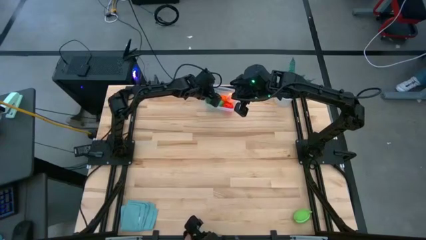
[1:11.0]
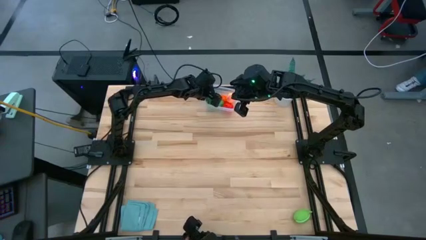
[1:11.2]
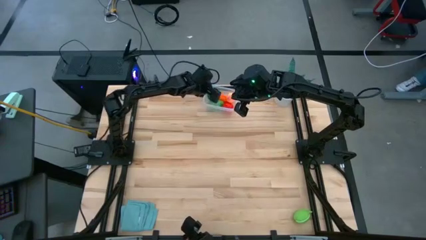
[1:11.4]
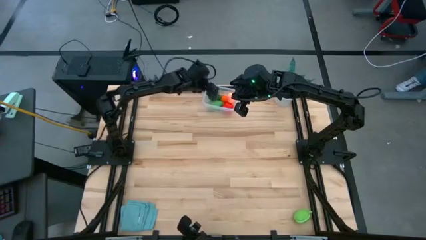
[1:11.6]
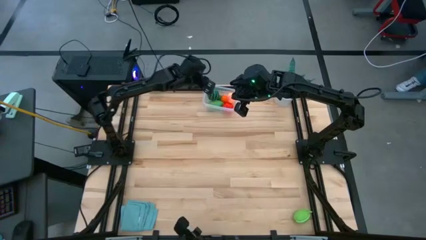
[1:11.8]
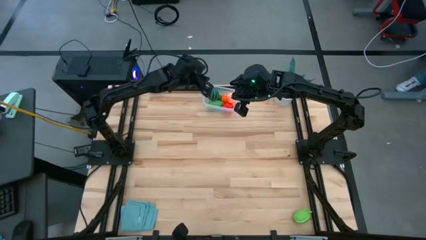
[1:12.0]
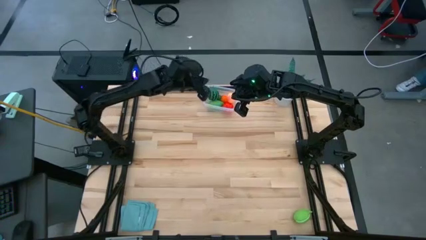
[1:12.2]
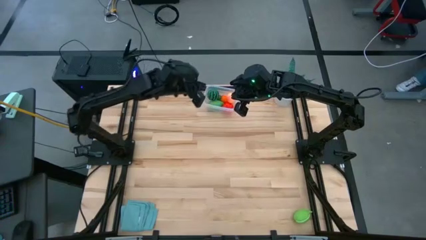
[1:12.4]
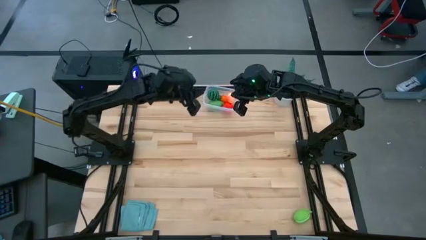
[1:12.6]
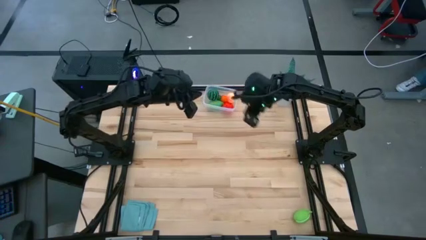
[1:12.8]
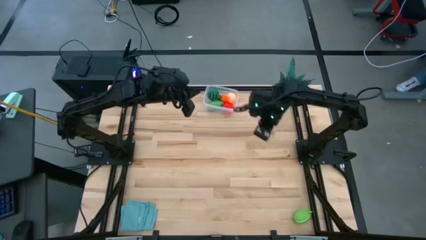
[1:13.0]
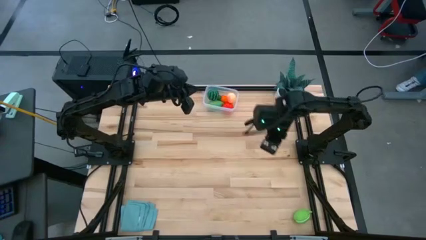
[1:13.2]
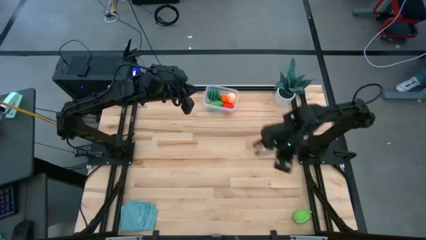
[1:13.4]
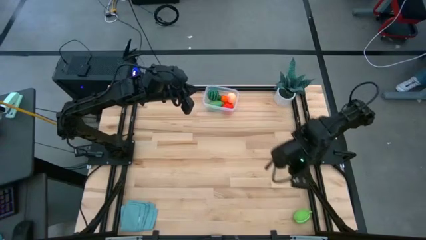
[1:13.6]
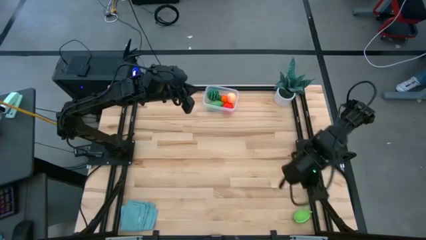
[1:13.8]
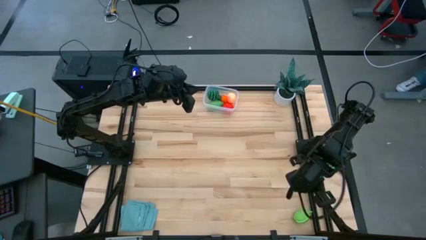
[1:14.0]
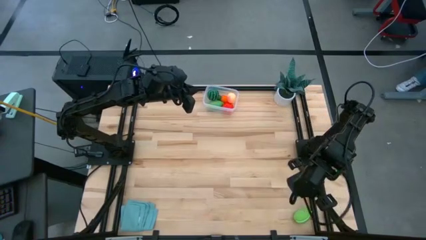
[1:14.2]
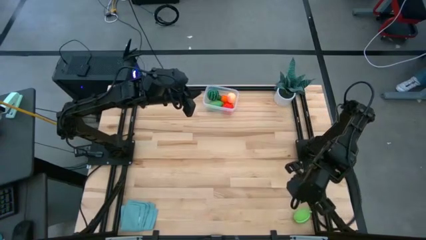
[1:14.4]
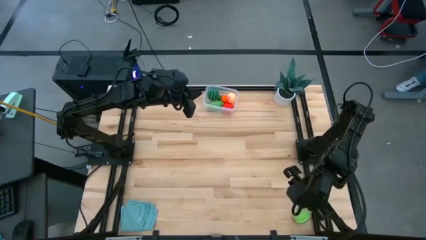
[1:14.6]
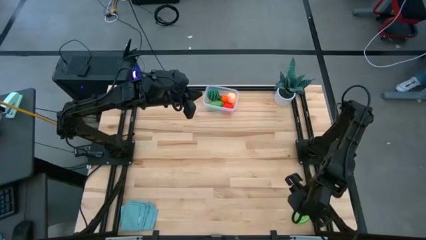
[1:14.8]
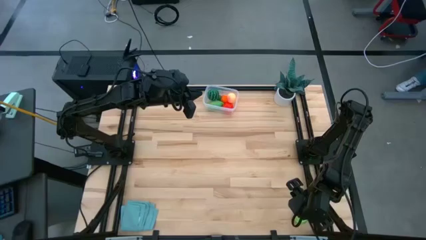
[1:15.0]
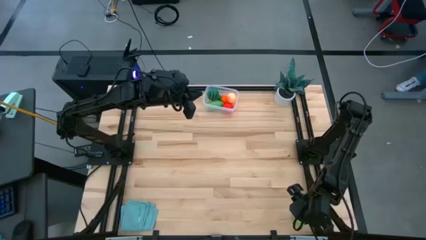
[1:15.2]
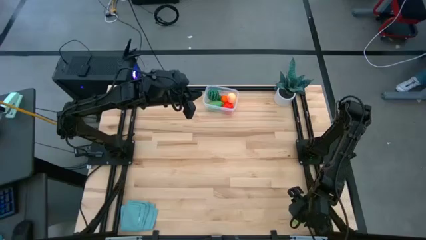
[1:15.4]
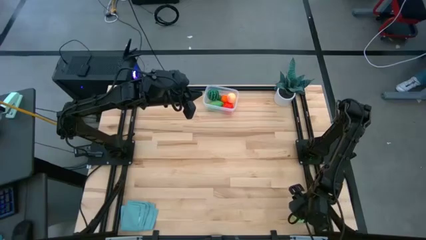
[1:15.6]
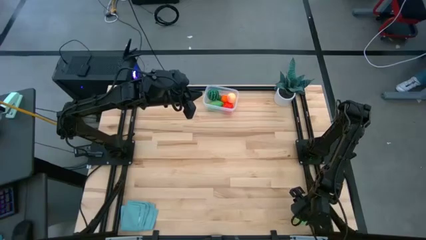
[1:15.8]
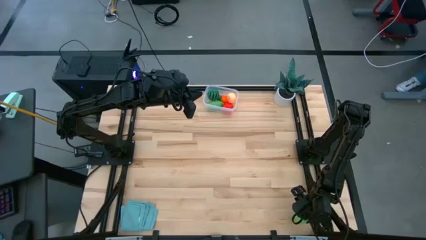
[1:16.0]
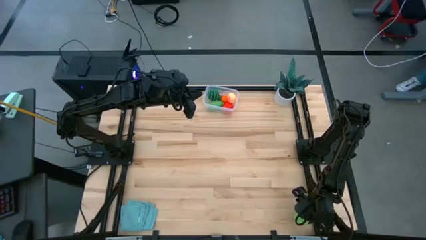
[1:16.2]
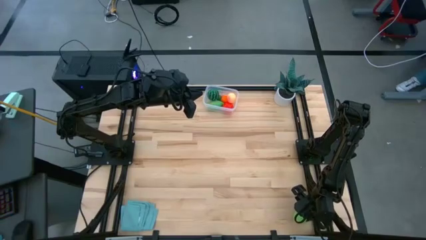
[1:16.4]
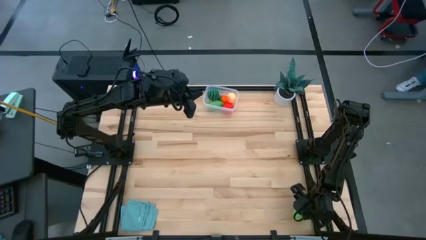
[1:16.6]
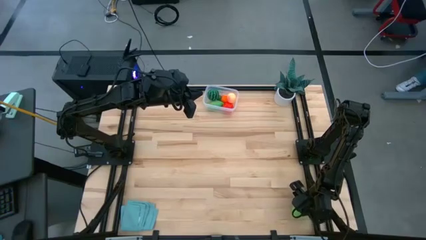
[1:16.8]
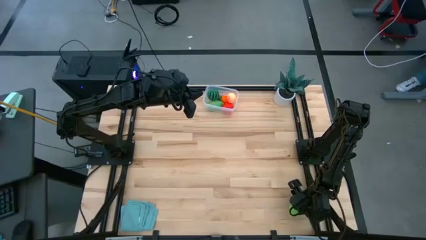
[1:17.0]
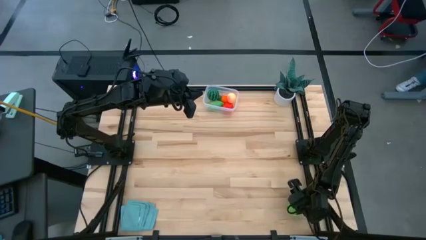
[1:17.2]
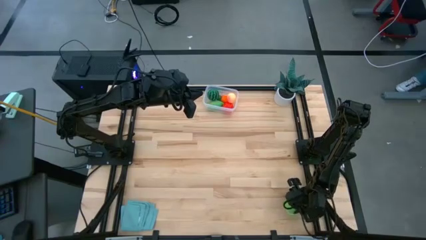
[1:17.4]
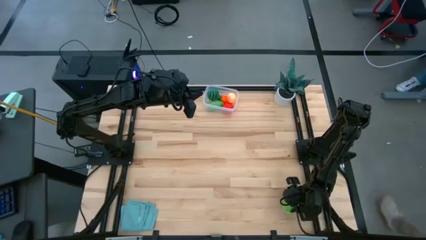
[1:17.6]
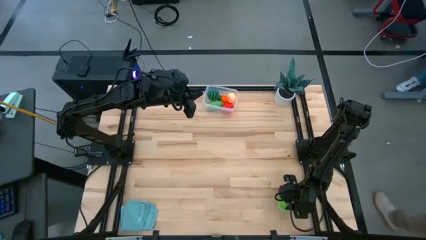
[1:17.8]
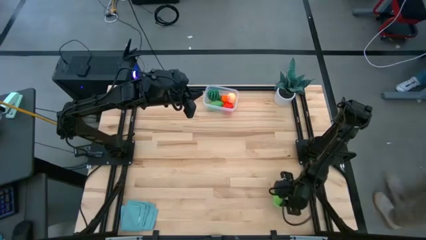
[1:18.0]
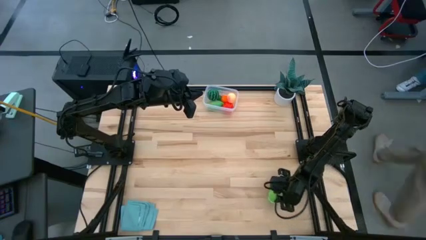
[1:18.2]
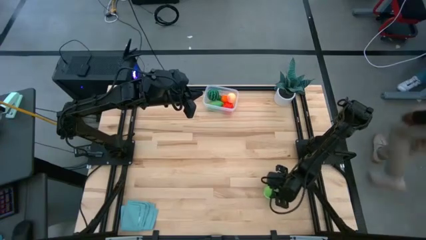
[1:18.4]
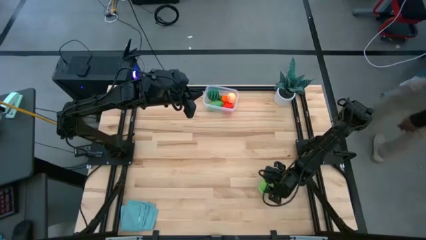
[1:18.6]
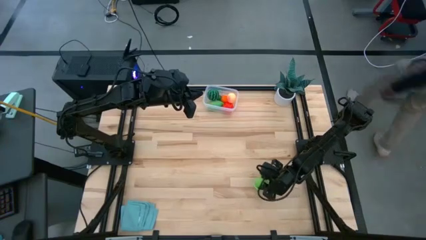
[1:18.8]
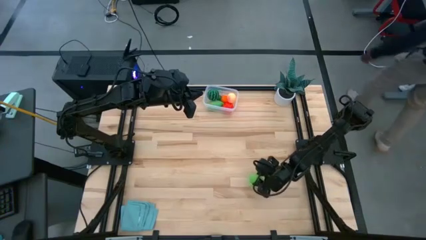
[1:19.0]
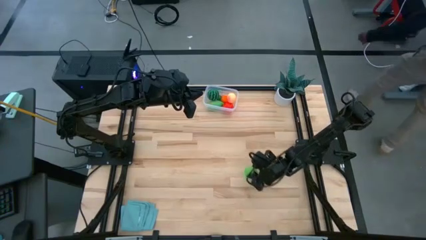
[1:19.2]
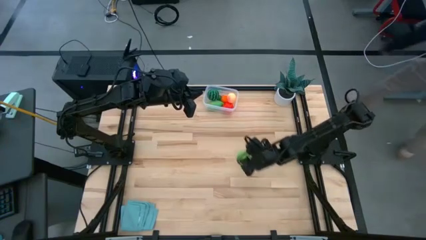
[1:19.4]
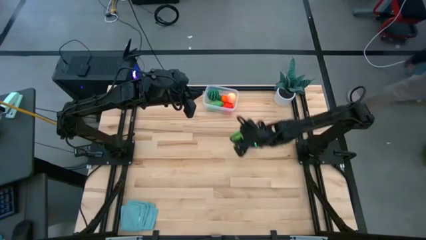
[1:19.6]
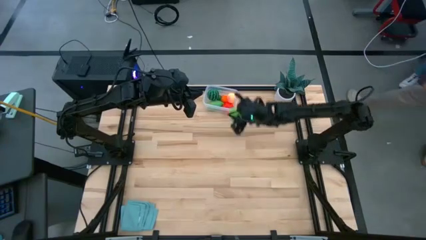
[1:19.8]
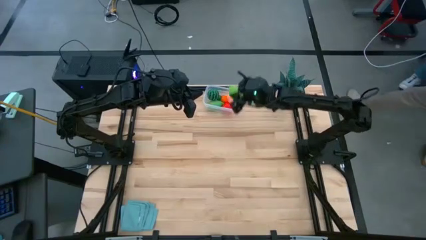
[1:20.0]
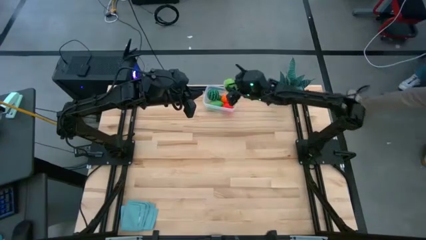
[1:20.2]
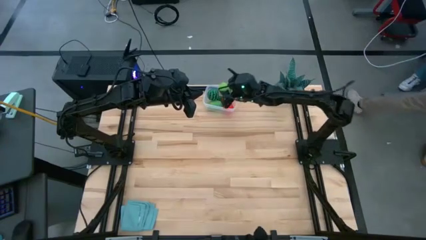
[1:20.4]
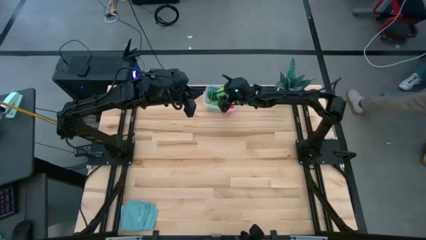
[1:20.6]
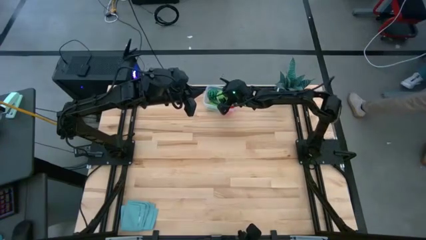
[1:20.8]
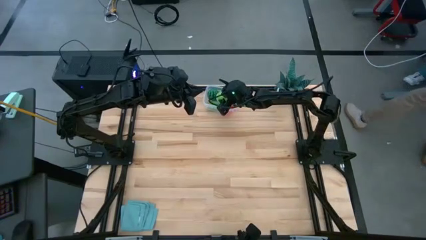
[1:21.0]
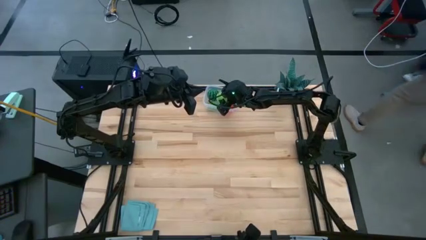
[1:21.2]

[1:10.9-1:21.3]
Task: Pick and placing Produce into tupperware
Put the green cabbage into the transparent container

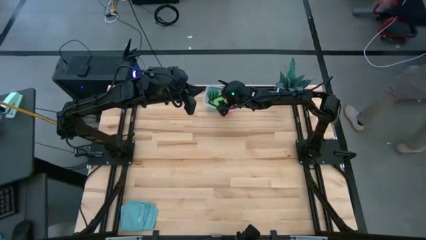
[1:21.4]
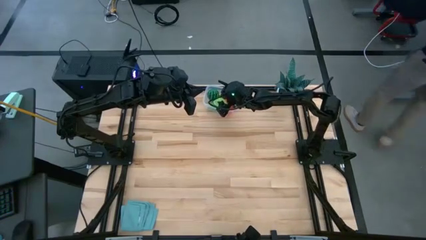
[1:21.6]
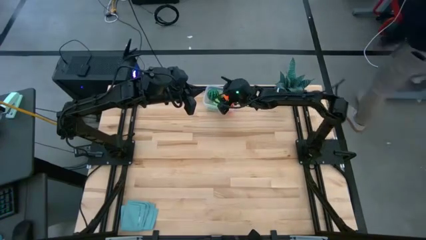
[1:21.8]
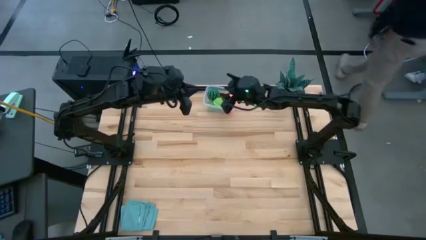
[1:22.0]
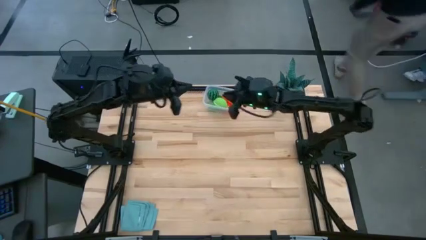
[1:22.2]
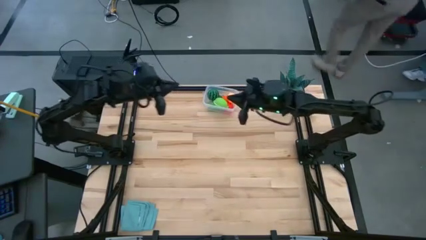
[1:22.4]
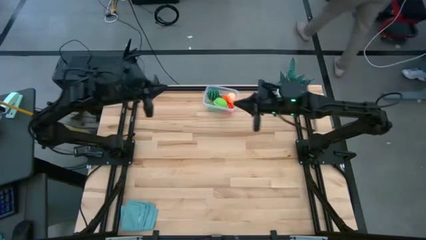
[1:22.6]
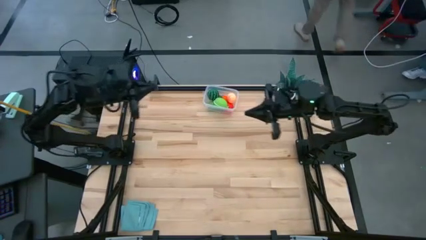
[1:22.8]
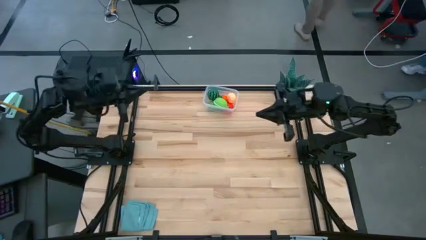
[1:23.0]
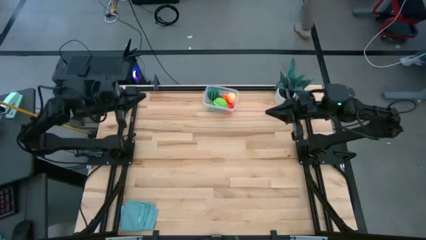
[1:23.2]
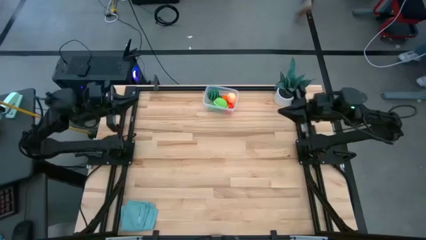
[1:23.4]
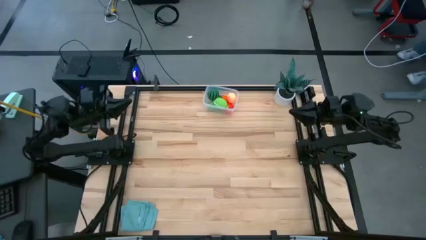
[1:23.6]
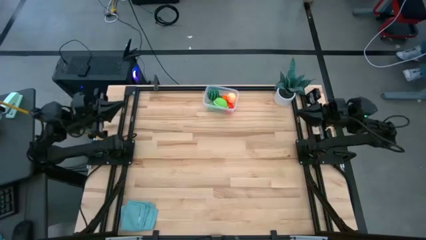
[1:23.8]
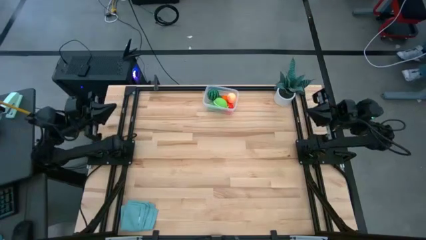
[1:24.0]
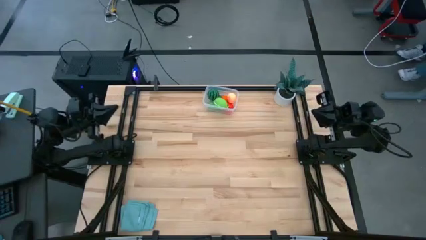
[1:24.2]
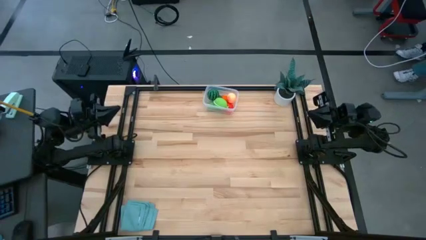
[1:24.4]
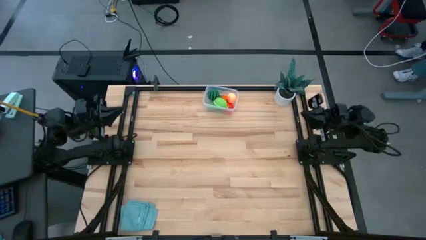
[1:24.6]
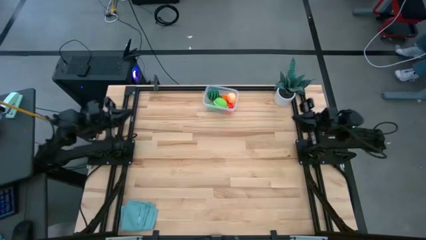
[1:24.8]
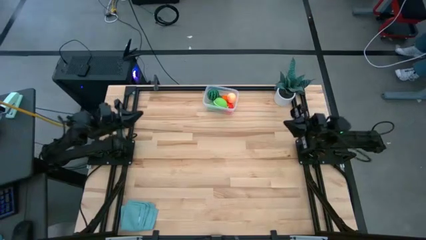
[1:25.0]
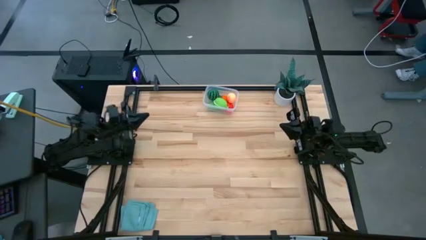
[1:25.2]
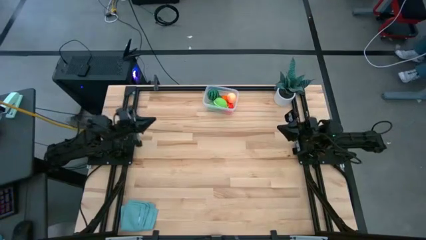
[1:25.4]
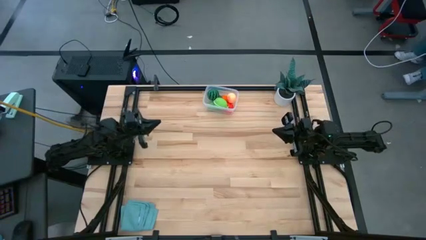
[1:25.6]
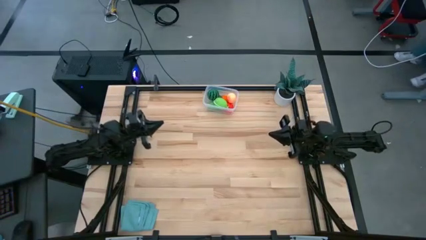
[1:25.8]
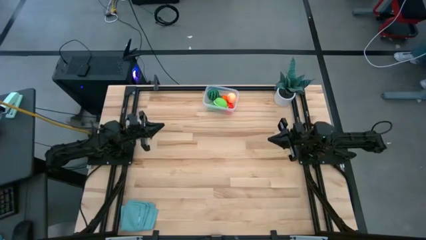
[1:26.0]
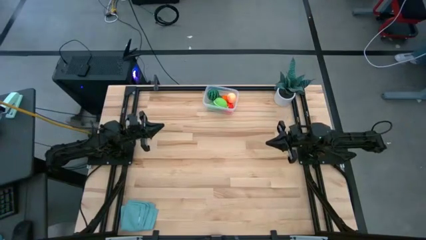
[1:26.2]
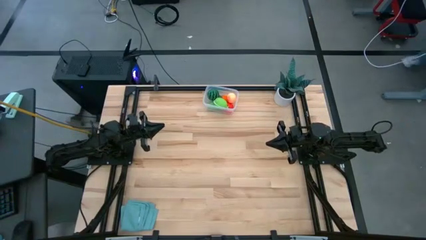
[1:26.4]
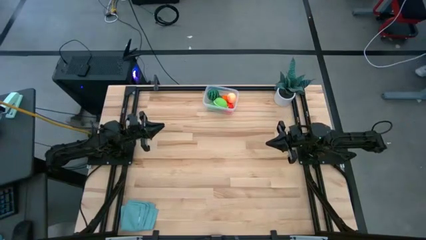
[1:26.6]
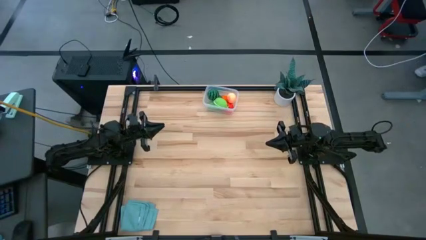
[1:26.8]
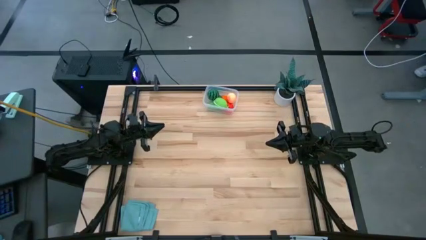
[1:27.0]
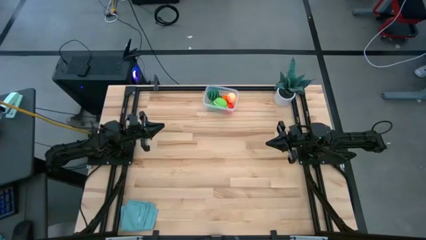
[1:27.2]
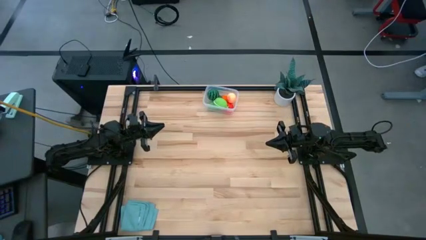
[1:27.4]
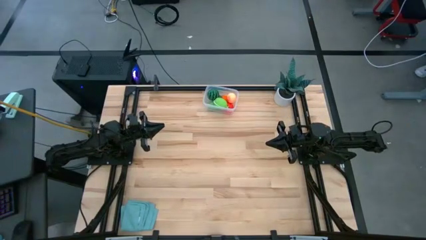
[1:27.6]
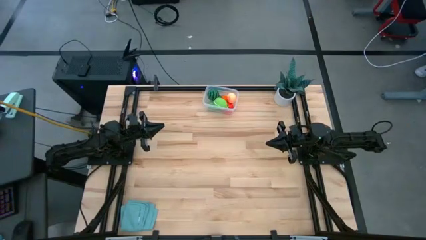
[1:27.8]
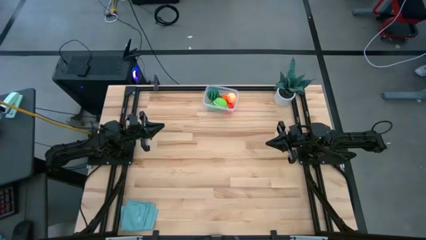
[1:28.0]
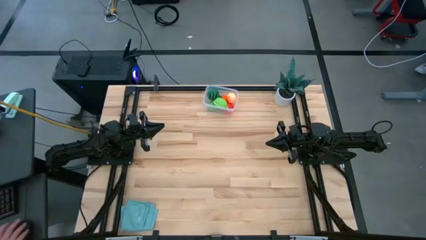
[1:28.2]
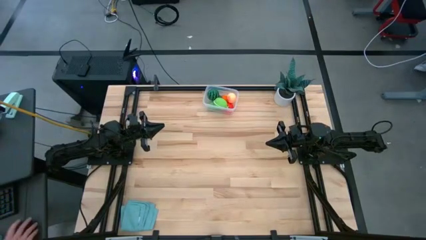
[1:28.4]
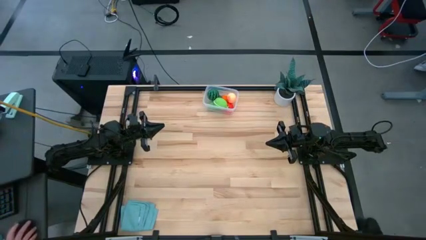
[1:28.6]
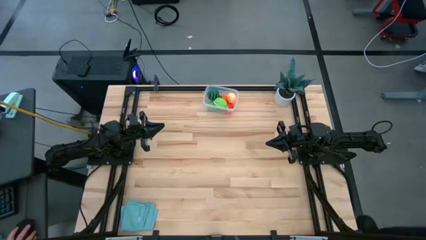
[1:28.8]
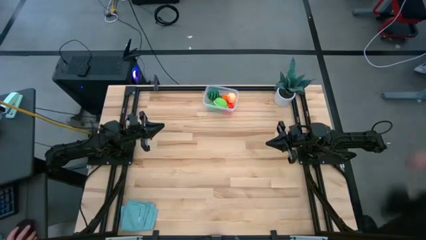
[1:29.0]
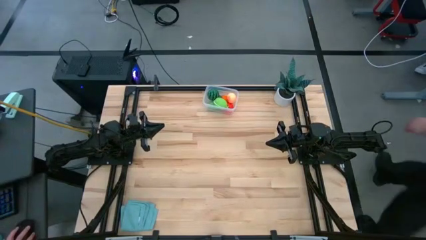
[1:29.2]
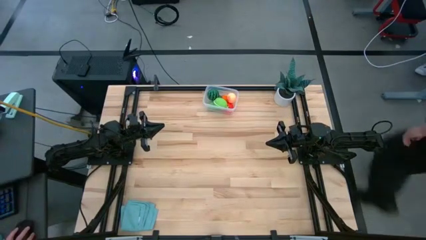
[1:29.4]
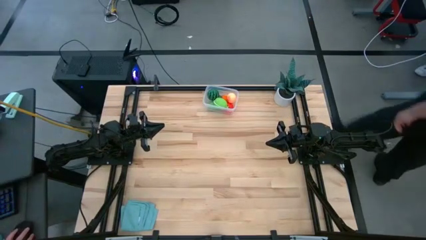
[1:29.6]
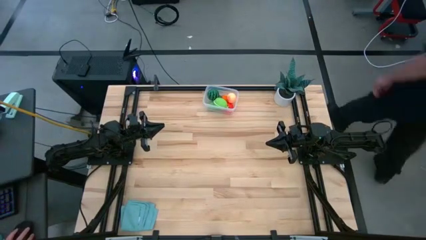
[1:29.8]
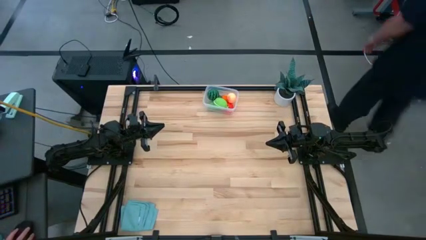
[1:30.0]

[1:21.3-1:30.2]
Return to Home Position
